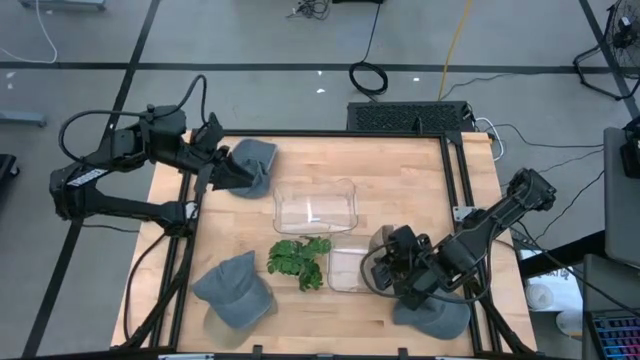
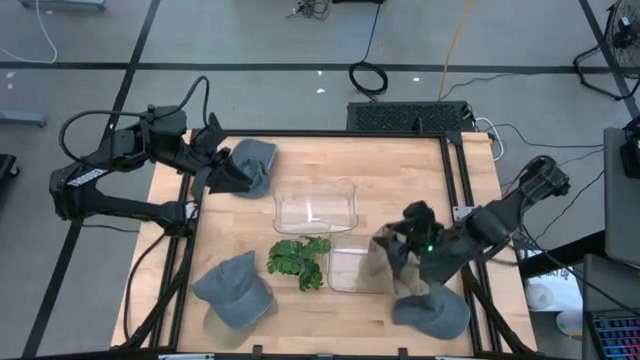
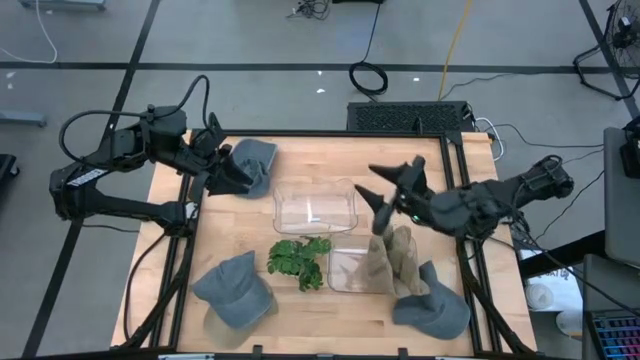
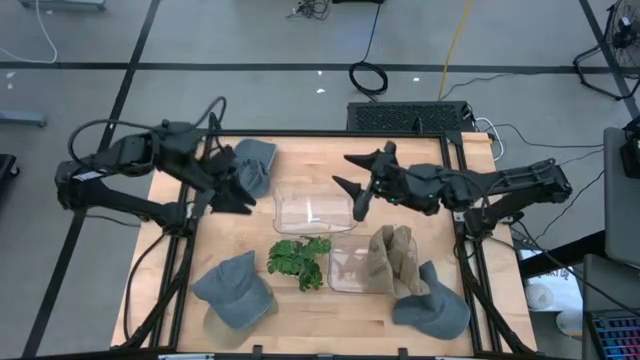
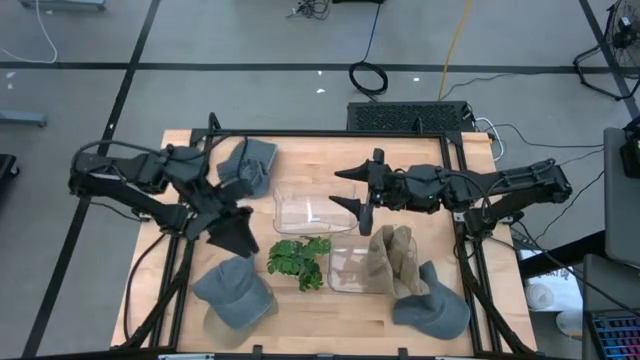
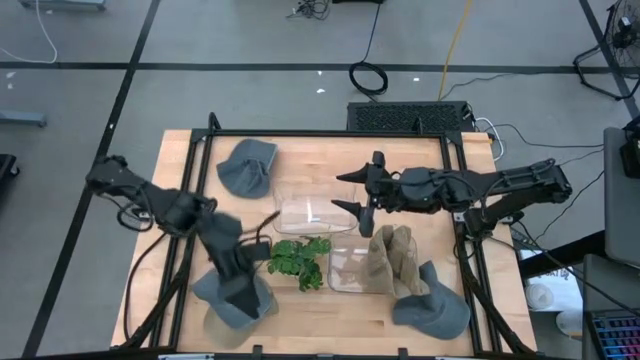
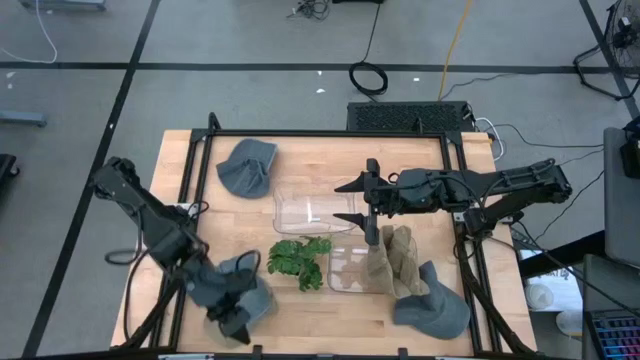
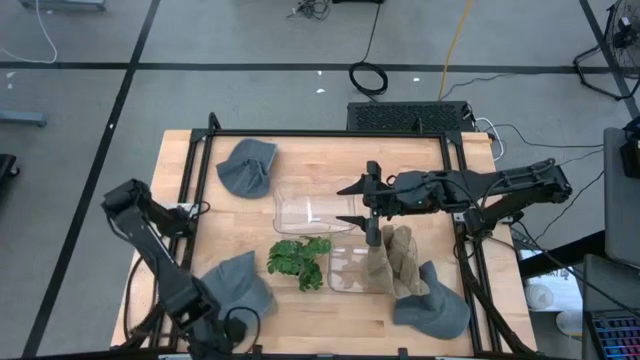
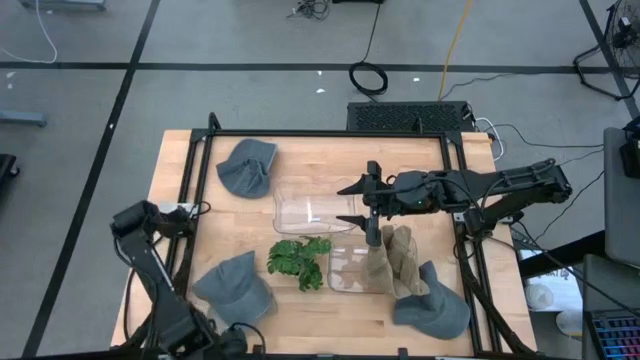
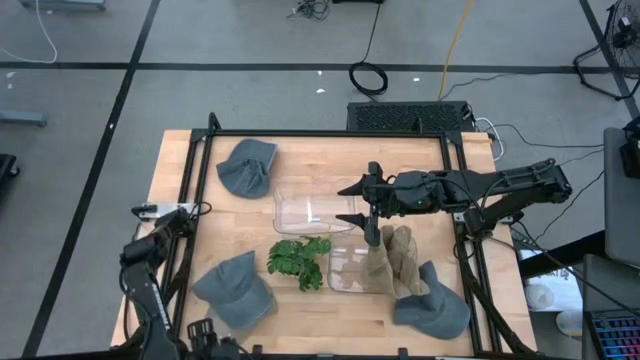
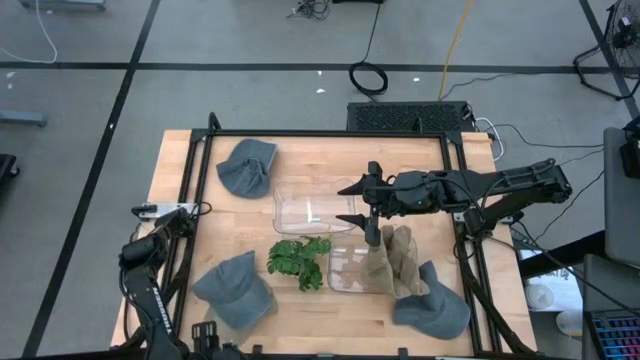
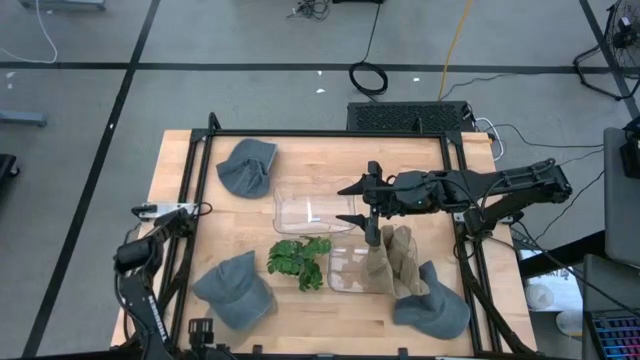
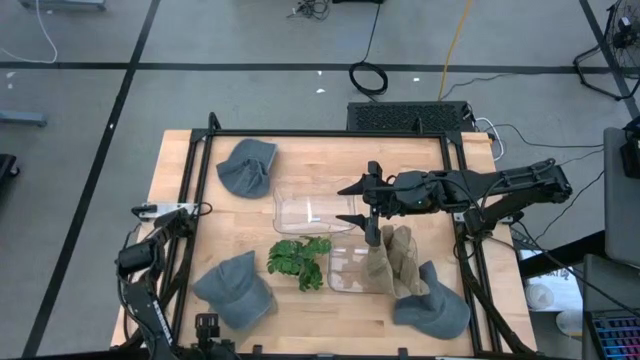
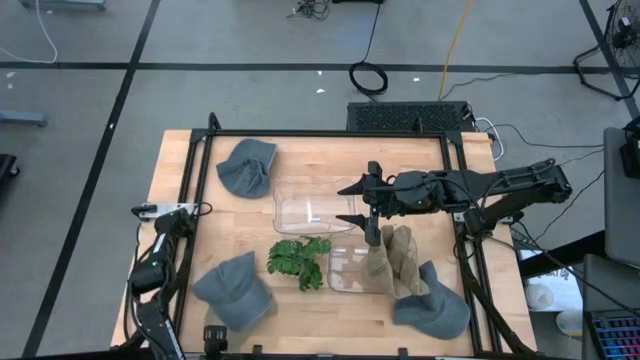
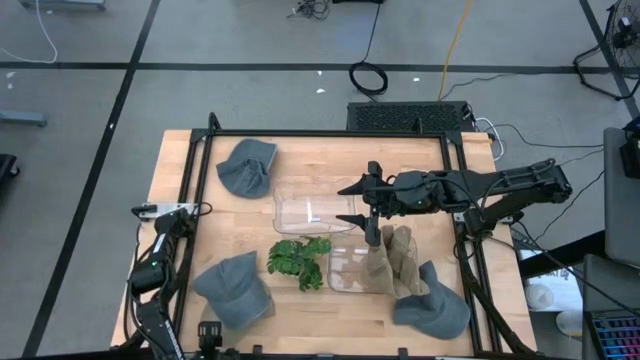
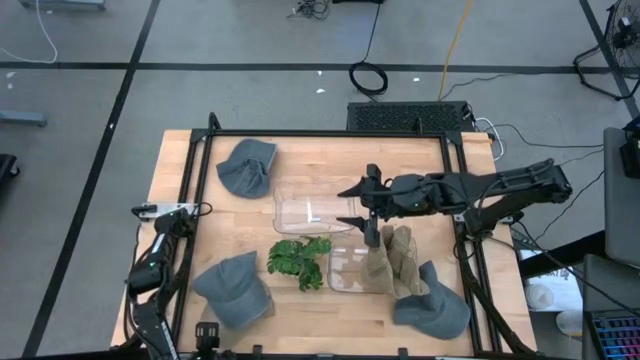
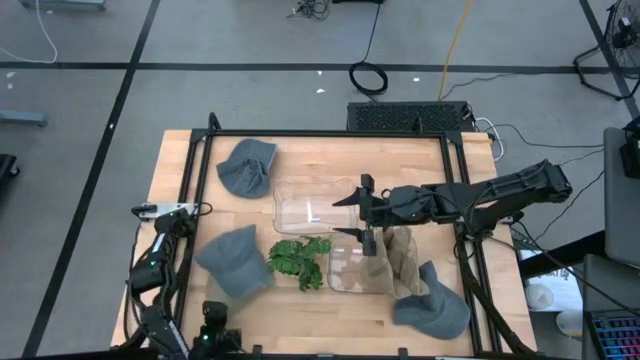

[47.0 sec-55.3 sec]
Task: Pick & Place hat
Put the brown cap into the bottom transparent bin

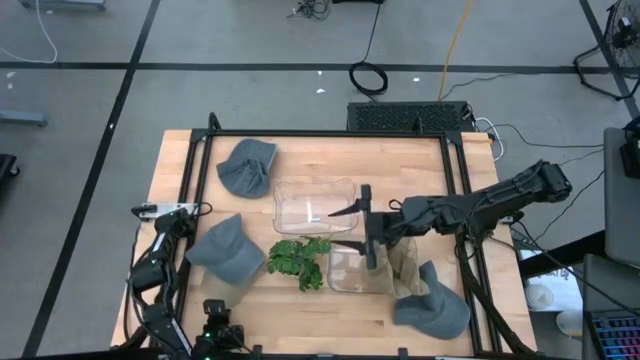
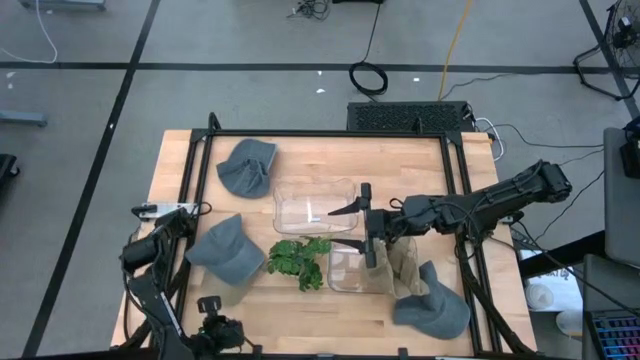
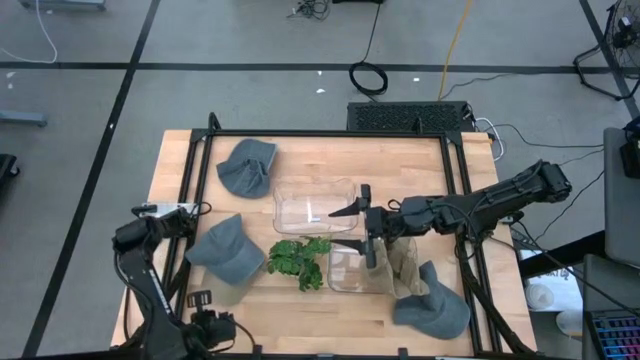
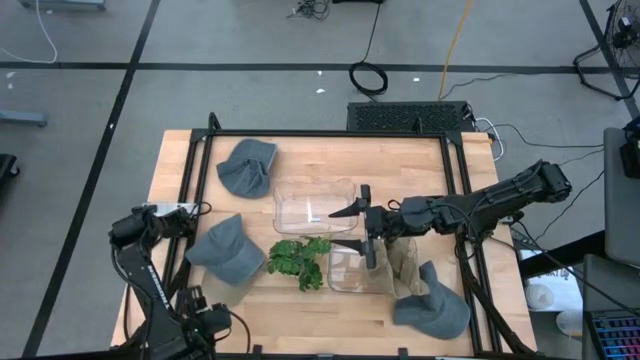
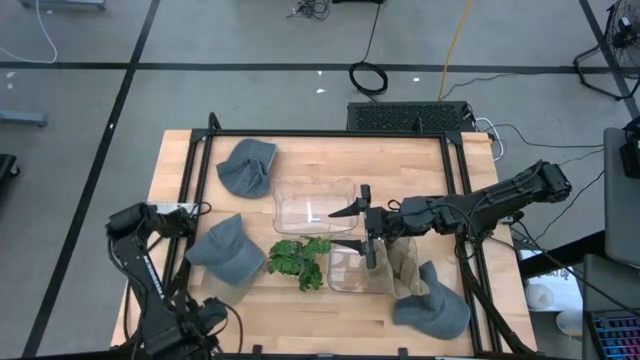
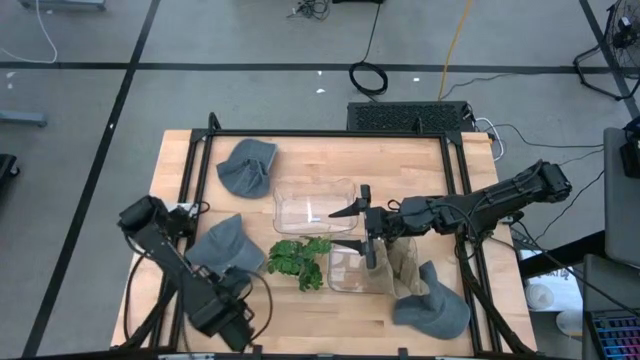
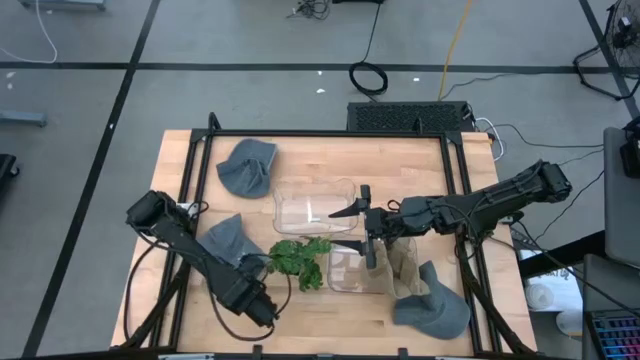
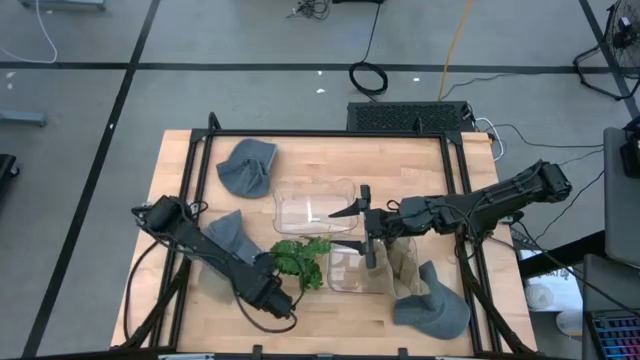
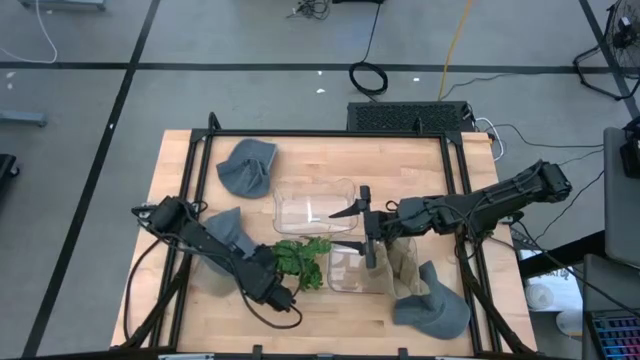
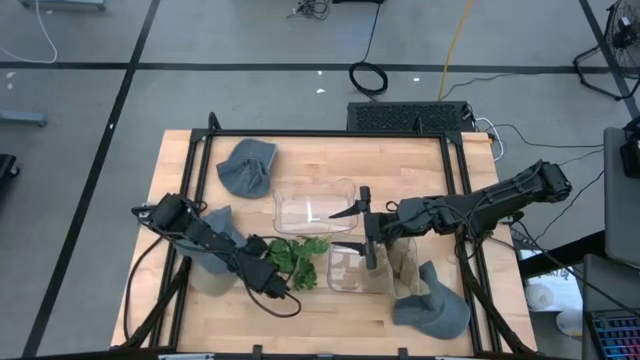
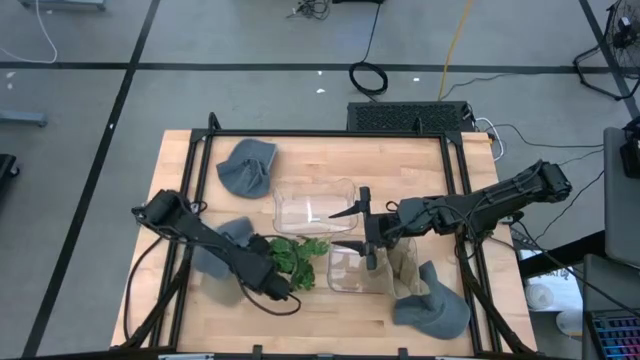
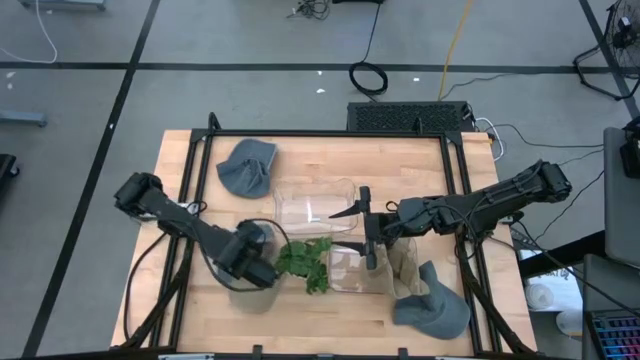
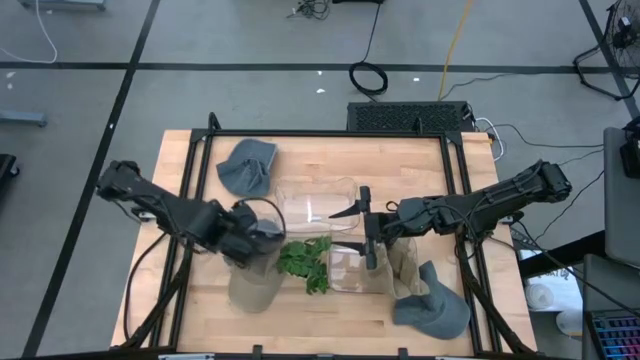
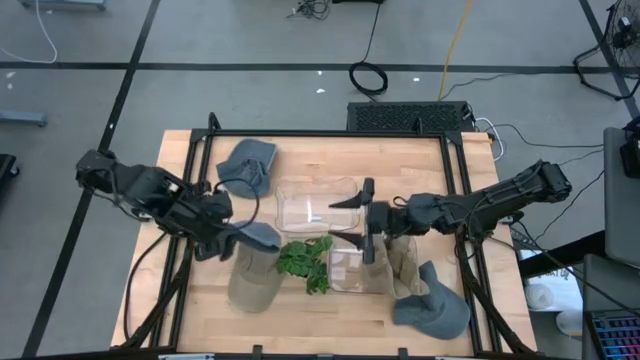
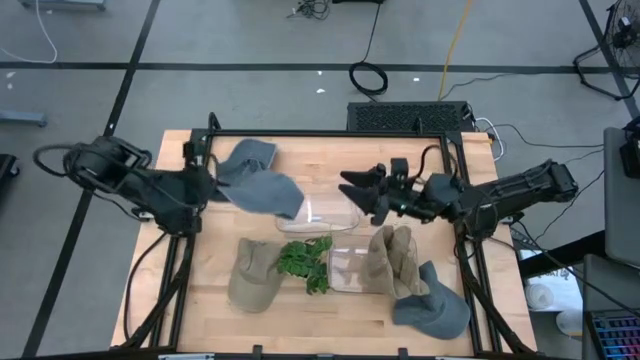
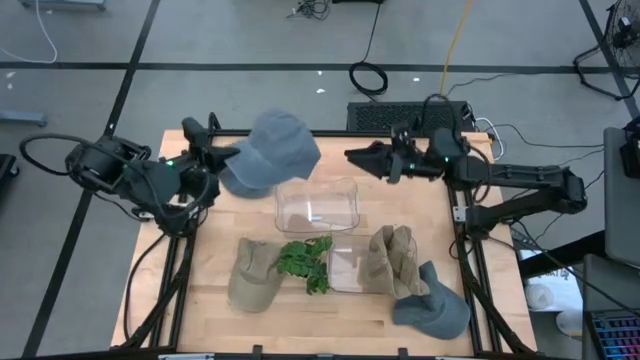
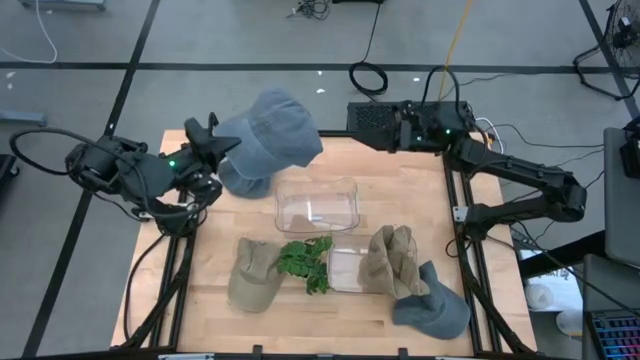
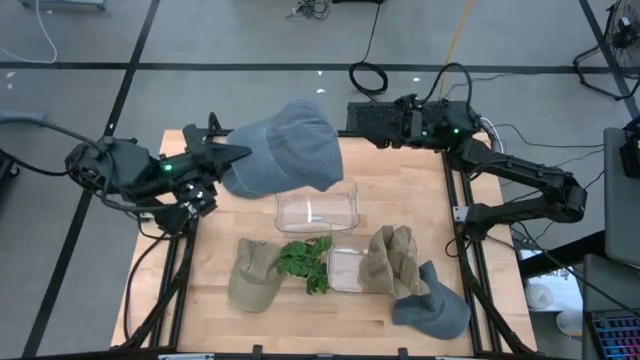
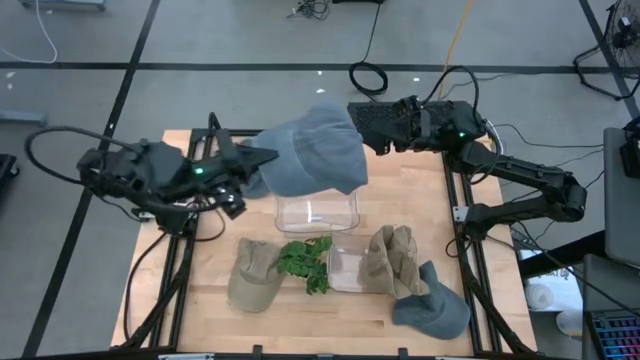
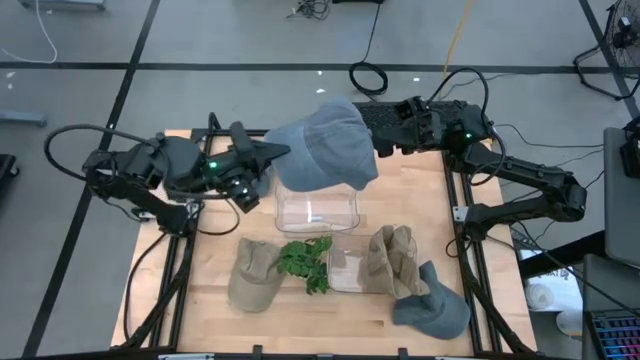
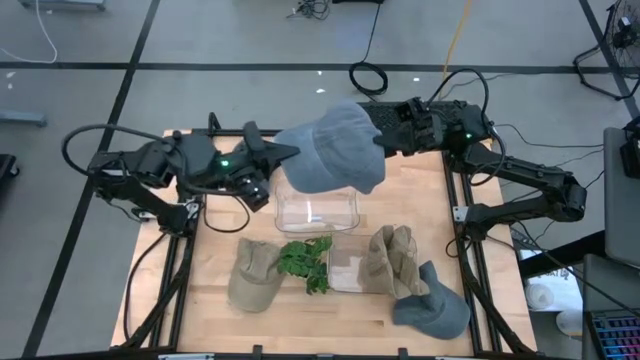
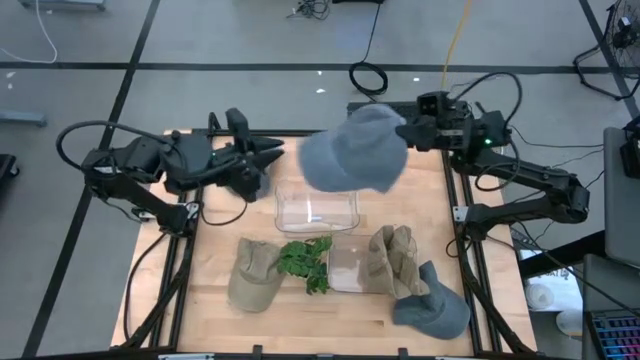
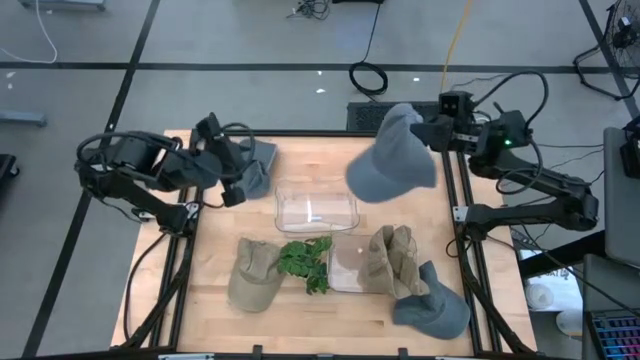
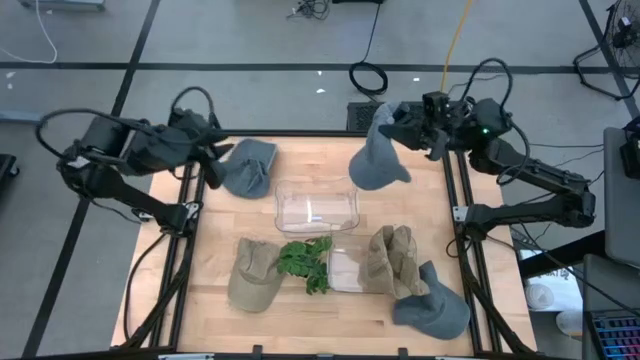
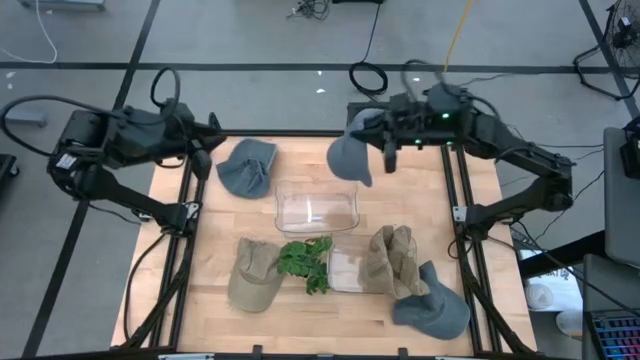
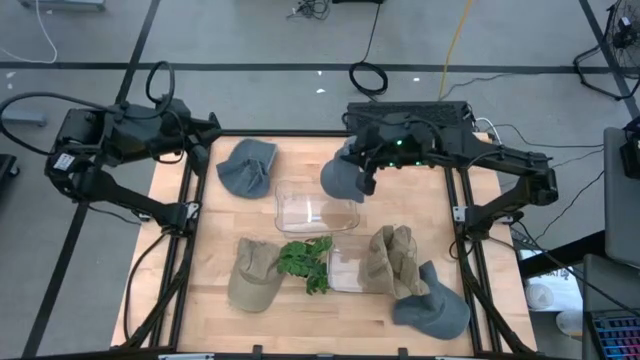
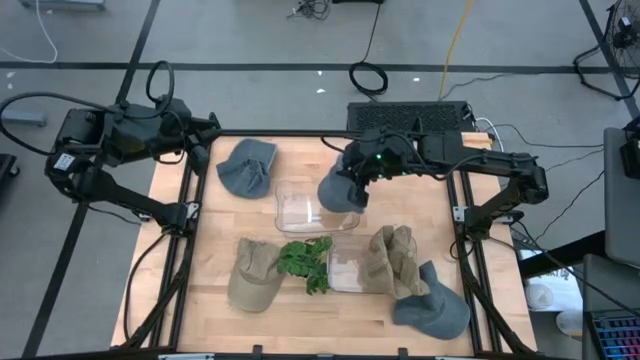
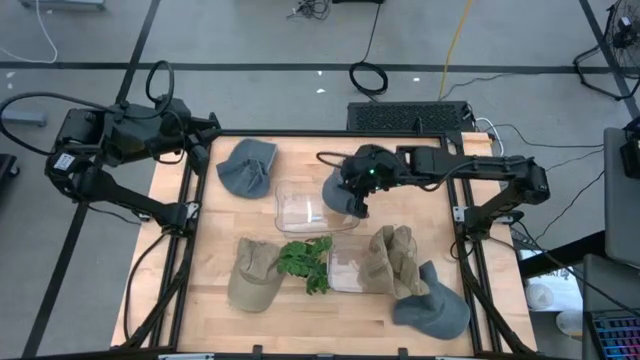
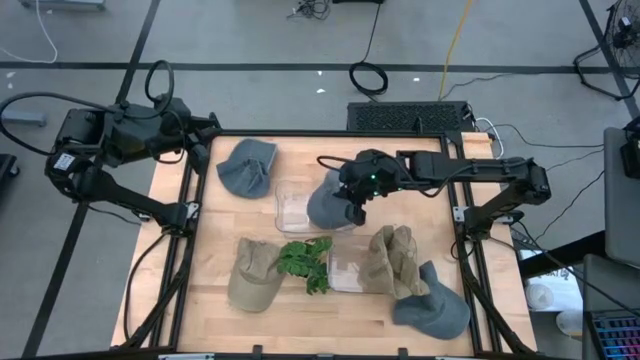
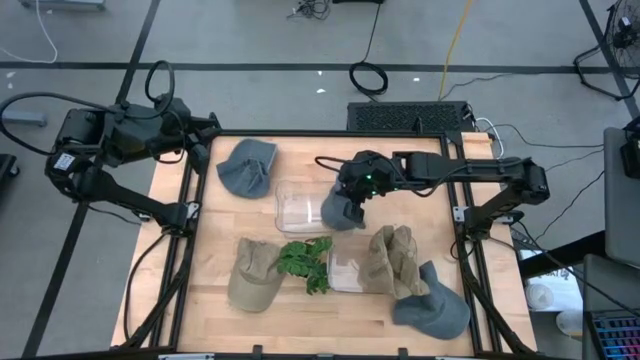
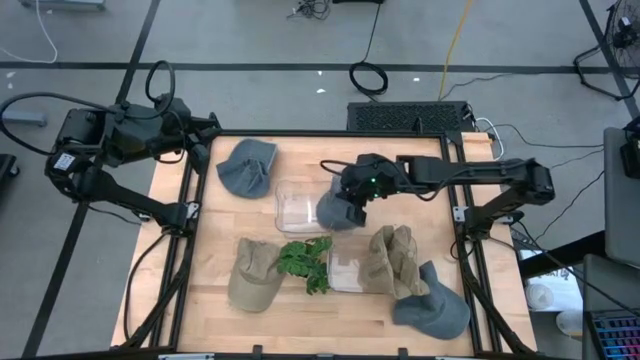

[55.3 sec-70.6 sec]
Put the middle left gray cap into the top transparent bin
